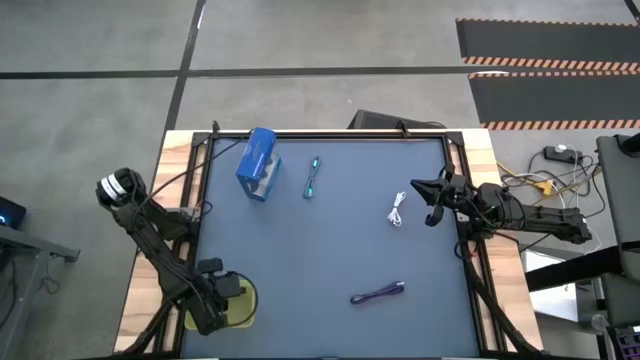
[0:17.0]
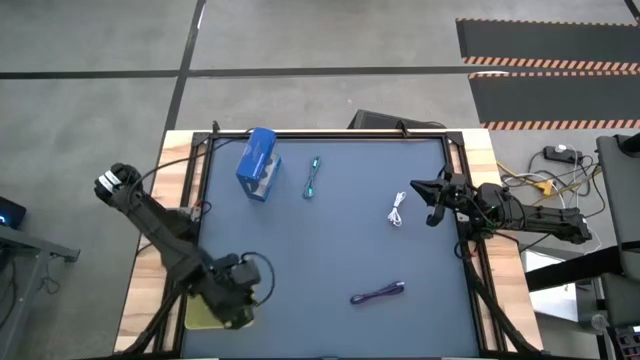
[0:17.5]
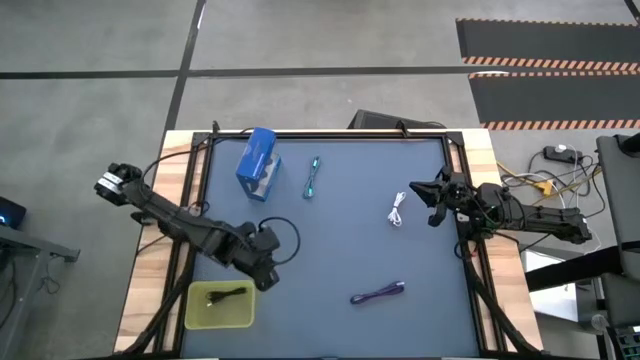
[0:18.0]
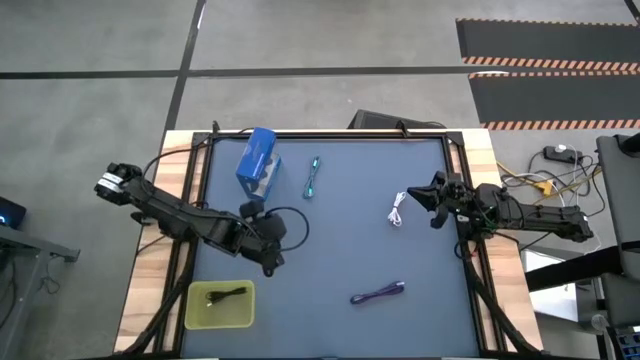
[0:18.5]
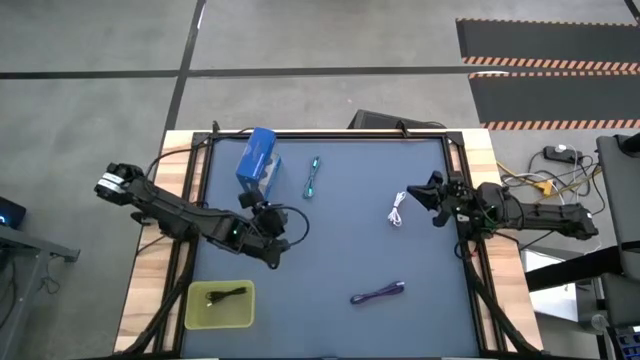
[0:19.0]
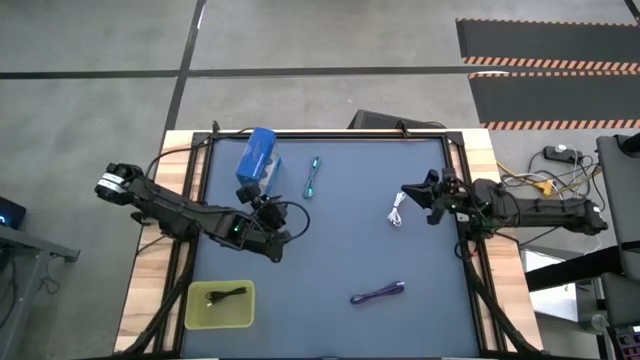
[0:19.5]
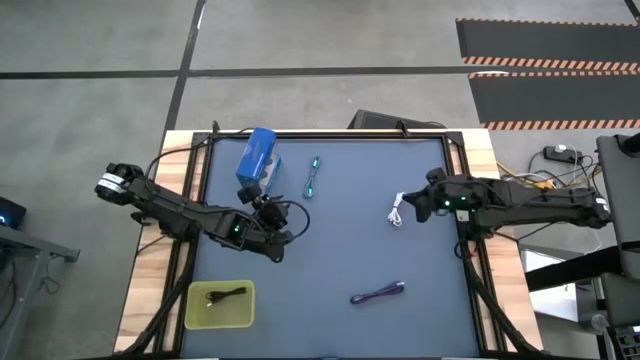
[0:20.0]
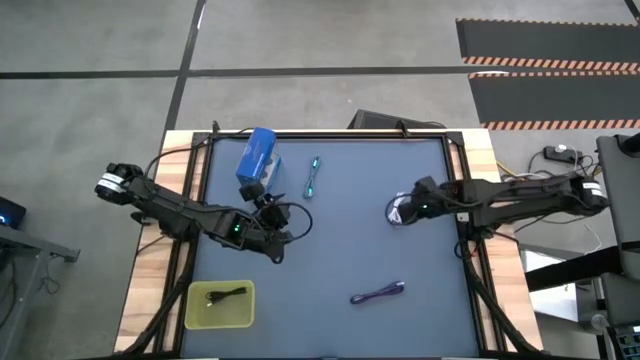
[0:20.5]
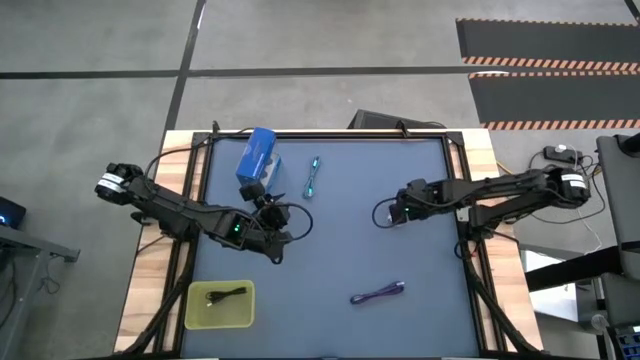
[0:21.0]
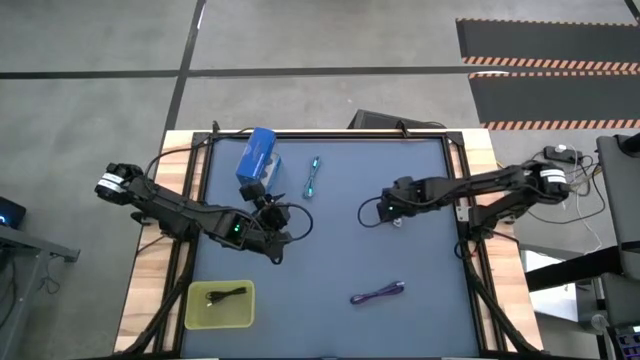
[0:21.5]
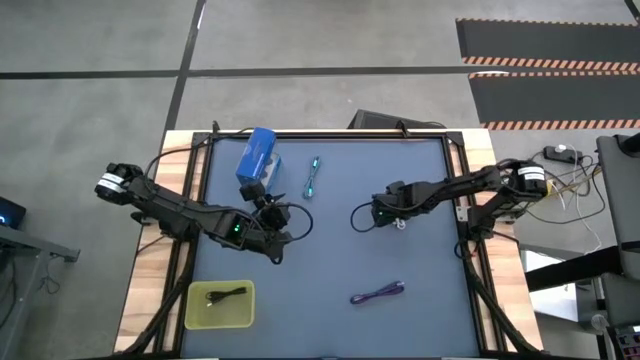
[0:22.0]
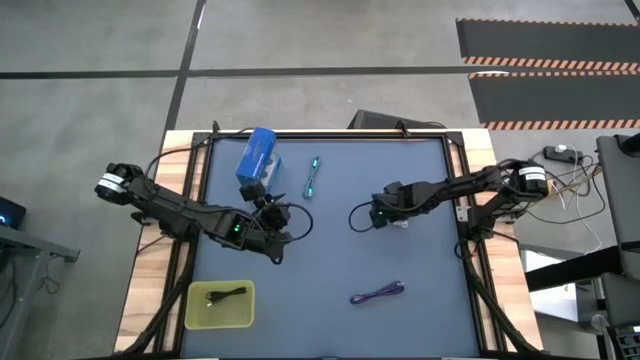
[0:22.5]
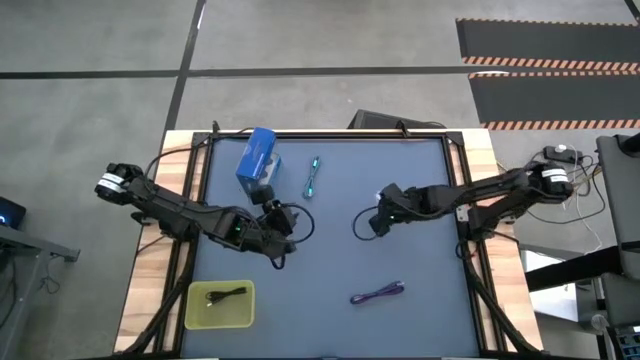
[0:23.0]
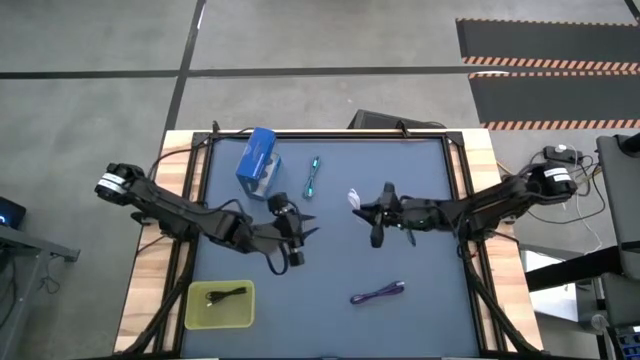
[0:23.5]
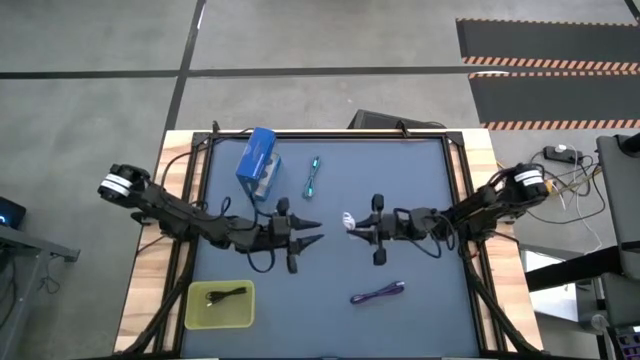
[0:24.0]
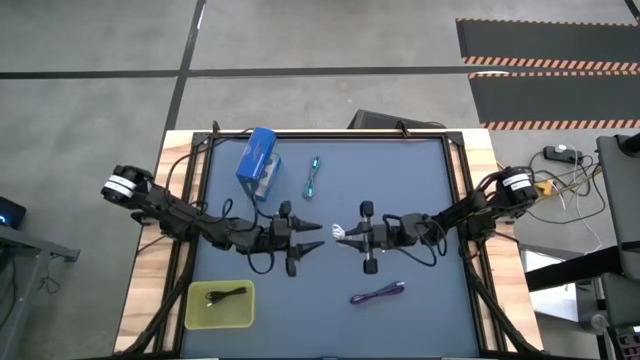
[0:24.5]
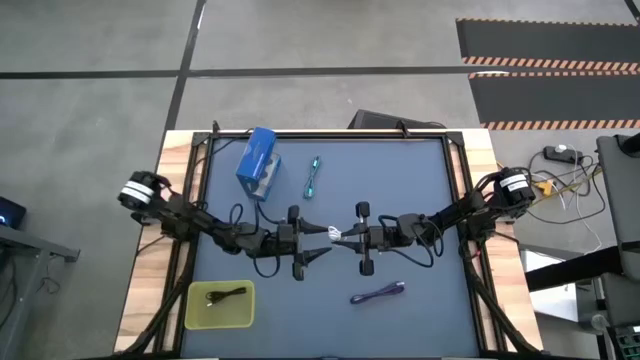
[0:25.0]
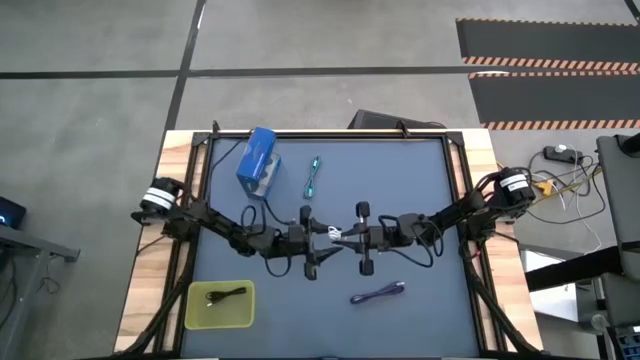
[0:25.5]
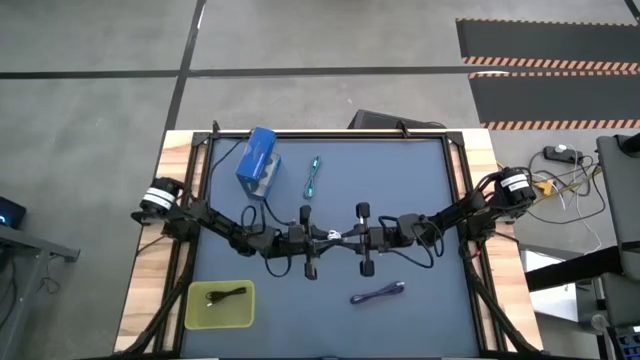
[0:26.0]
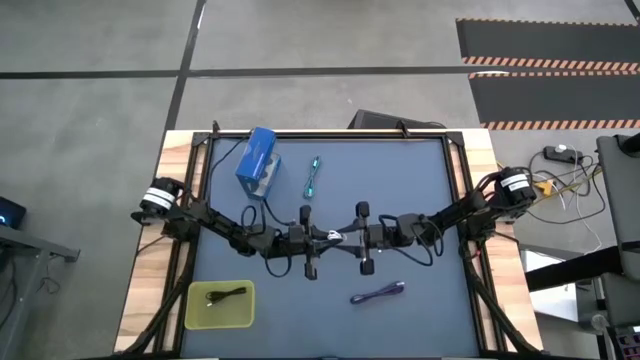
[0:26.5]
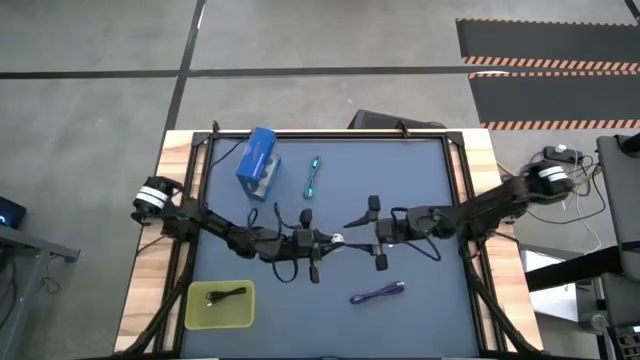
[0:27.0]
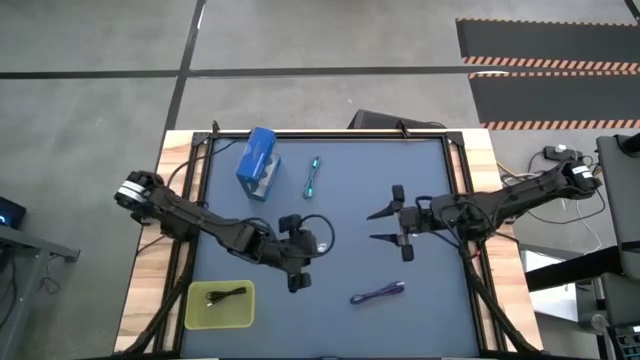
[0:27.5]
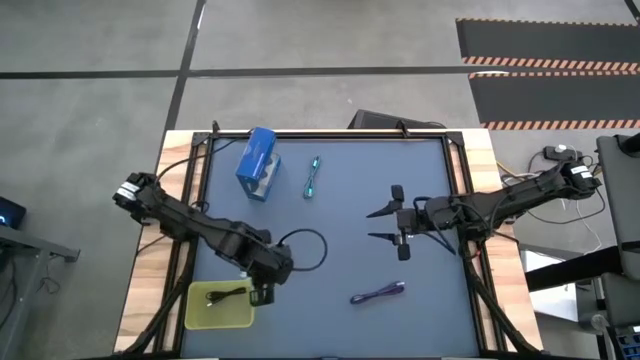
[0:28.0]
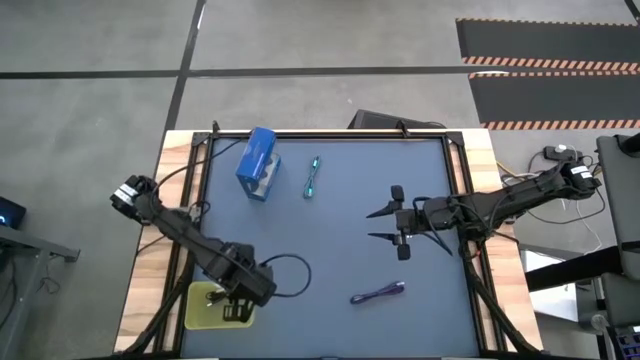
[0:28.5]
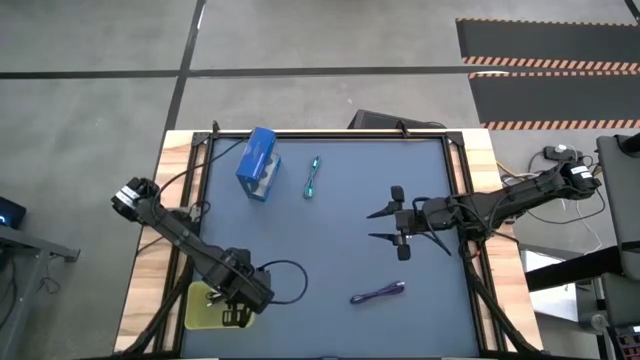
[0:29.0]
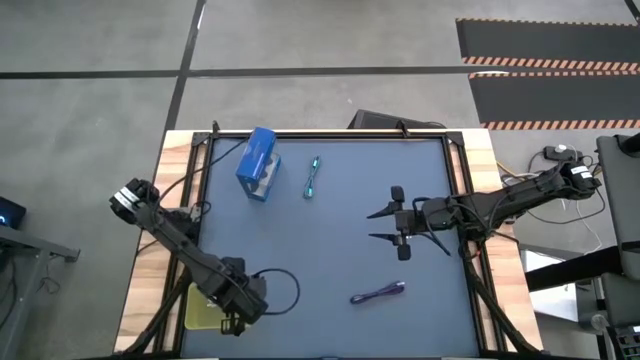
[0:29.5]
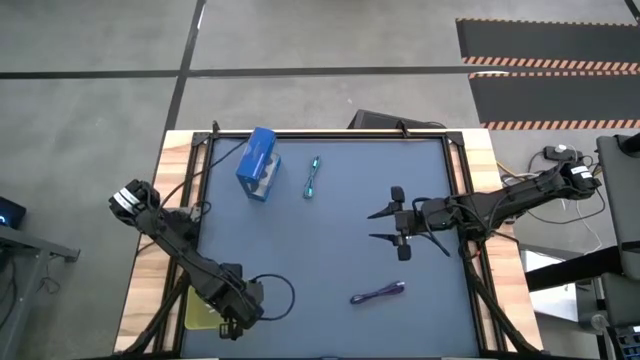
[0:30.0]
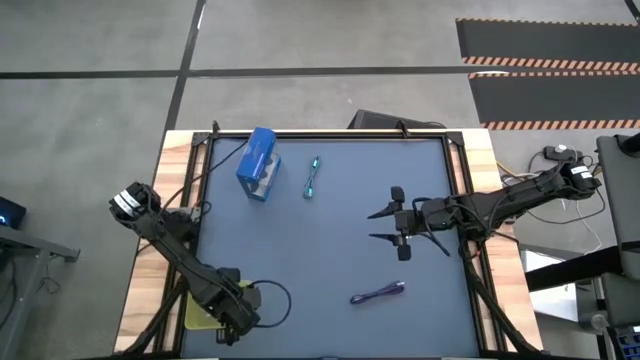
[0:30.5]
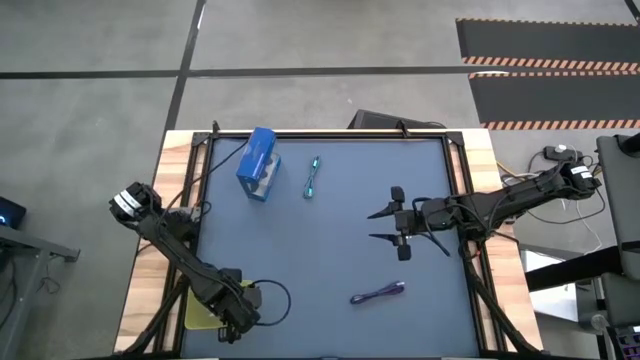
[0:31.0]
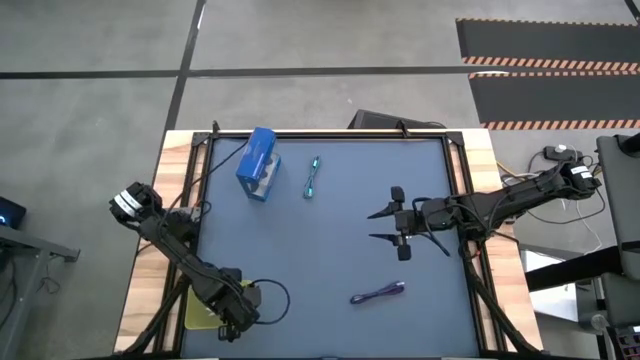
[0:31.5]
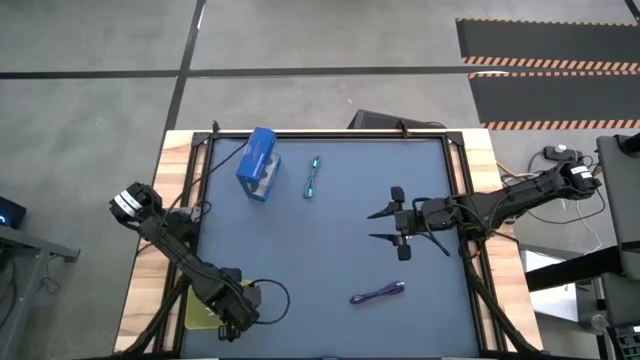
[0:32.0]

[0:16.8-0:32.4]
Task: Pick and place USB-C Cables
Put the white charger cable into the yellow bin

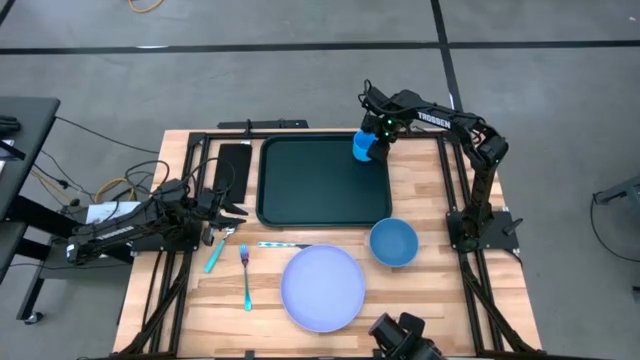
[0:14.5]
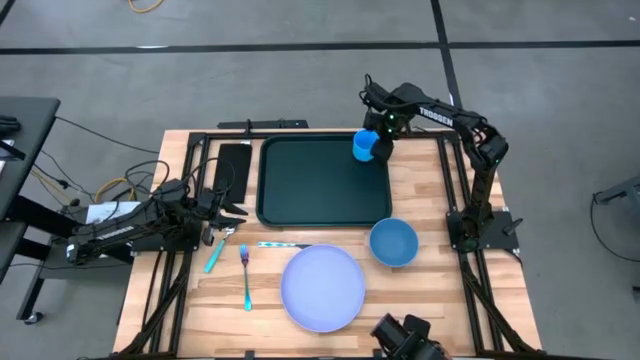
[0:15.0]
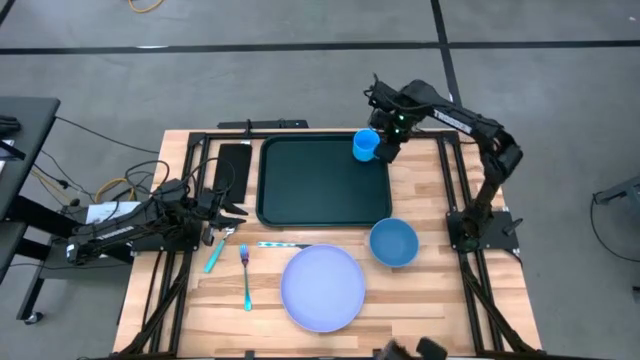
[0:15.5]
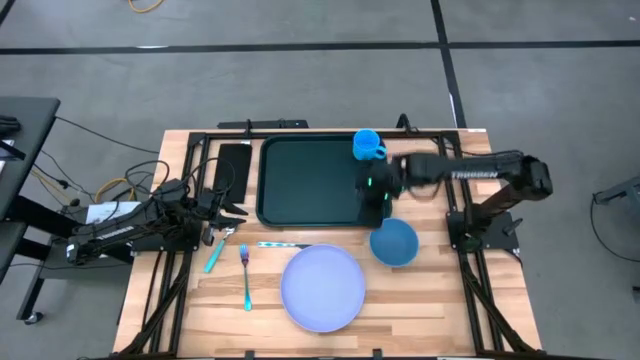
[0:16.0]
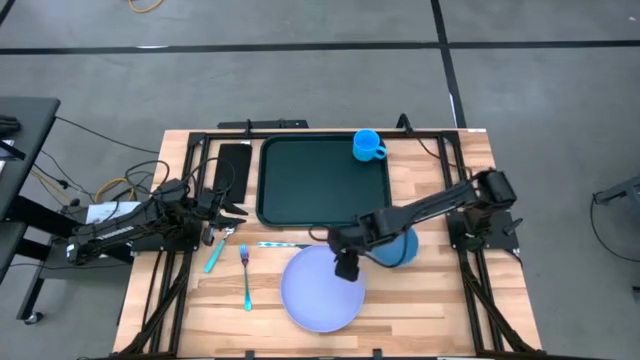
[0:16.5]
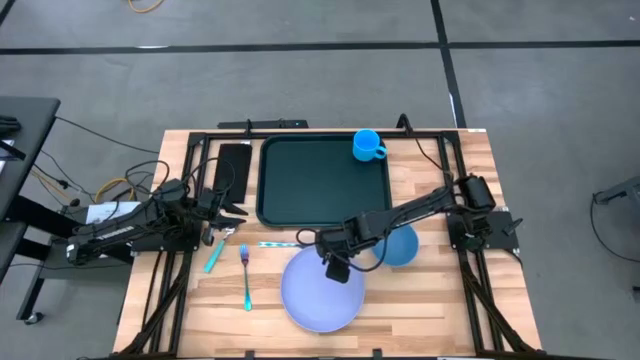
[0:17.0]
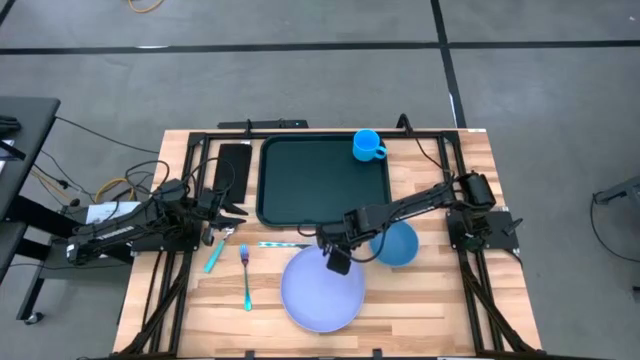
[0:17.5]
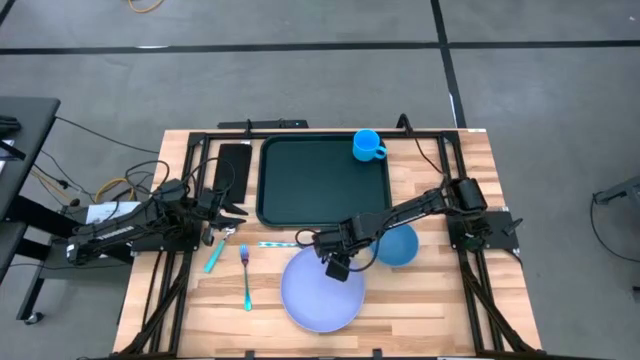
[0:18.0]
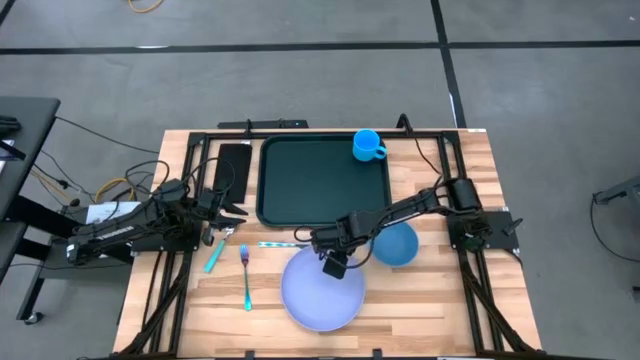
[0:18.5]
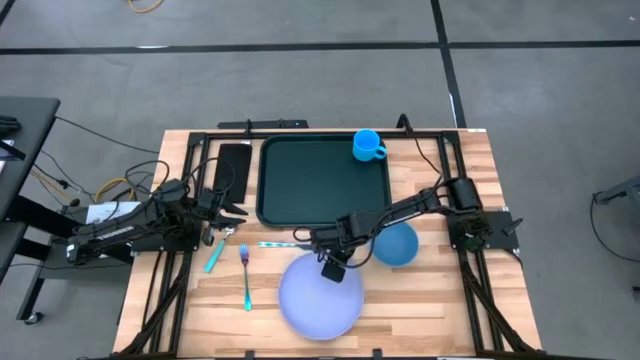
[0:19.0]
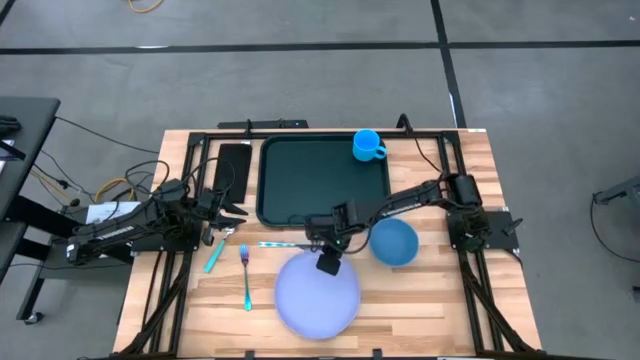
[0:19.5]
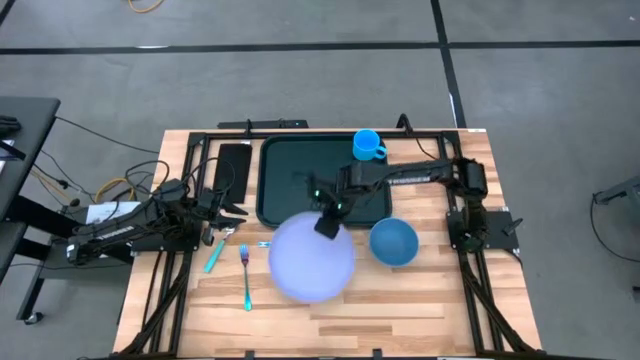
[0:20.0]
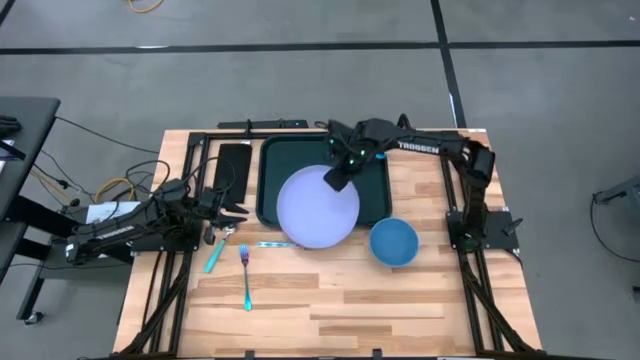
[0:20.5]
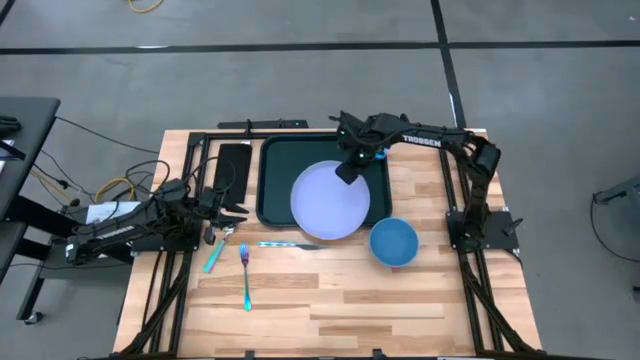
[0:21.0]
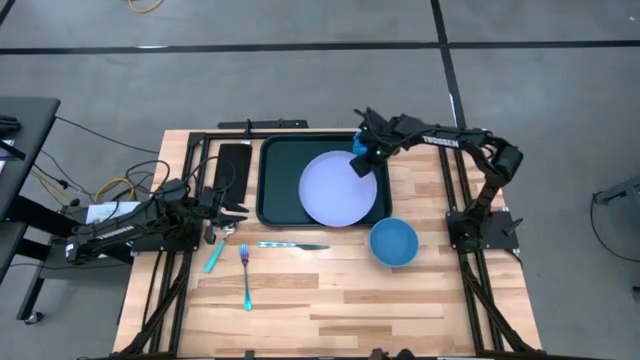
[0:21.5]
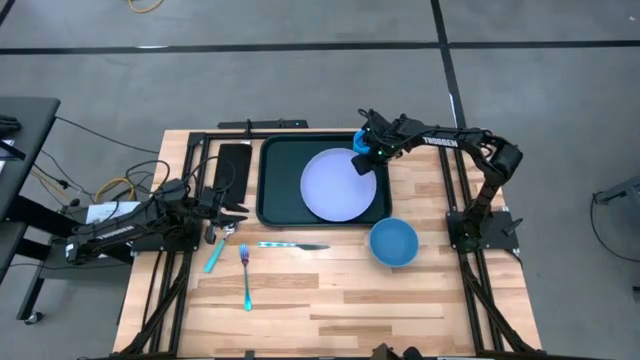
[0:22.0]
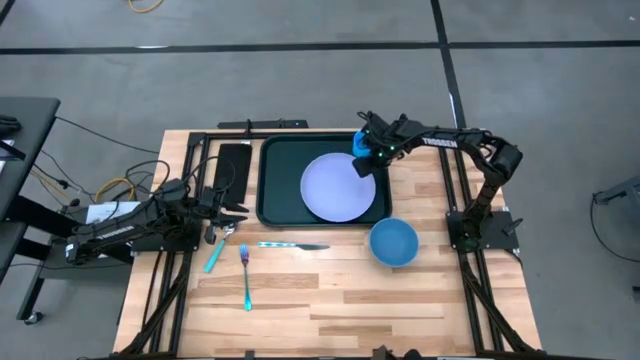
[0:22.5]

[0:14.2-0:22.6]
Task: Set up tray
Put the purple plate on the black tray at the bottom left of the blue cup
